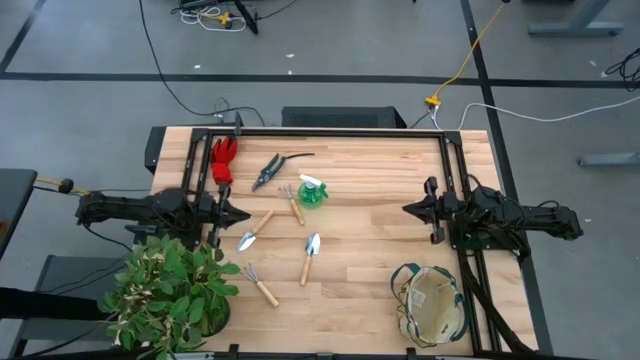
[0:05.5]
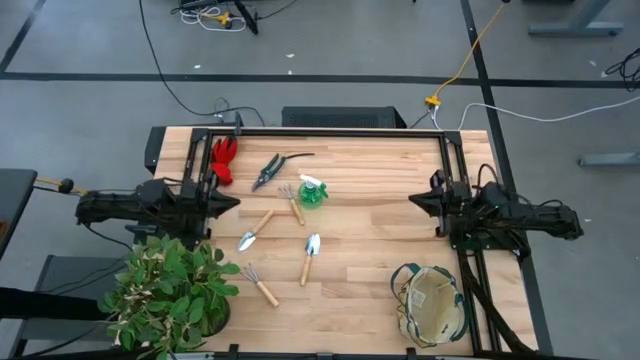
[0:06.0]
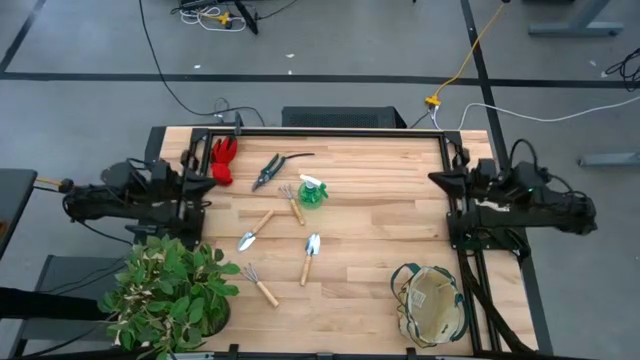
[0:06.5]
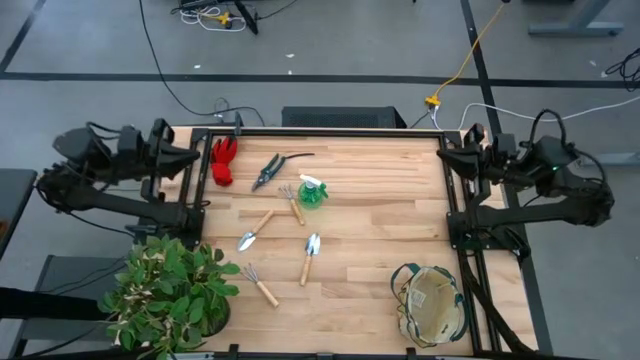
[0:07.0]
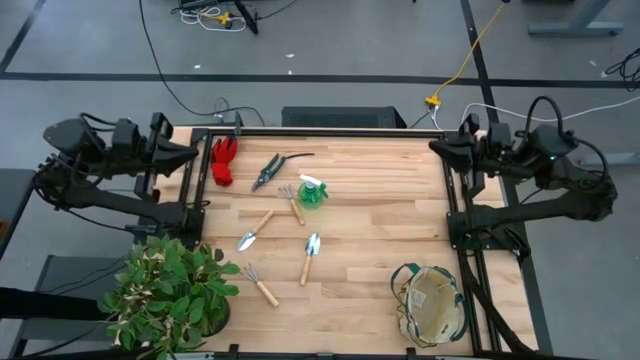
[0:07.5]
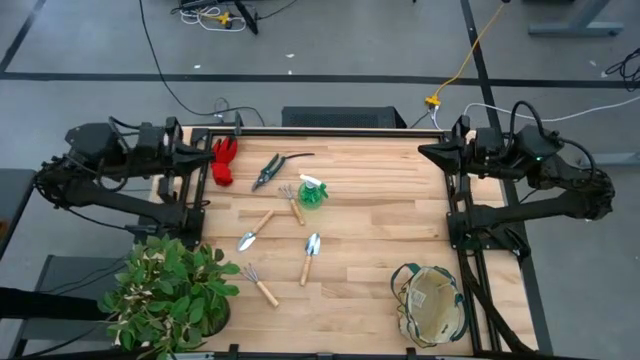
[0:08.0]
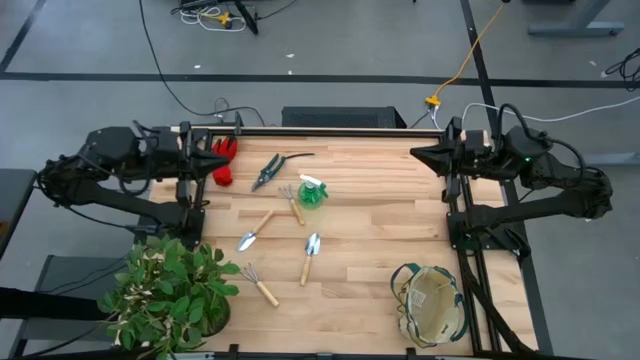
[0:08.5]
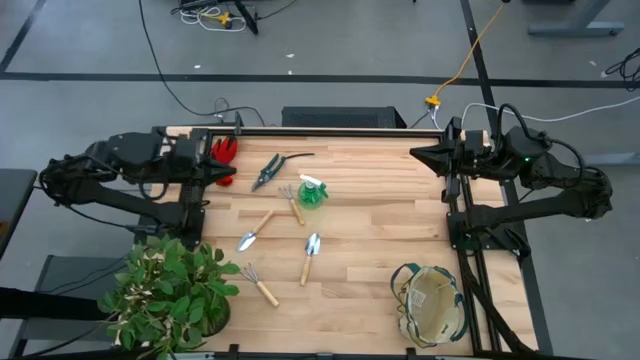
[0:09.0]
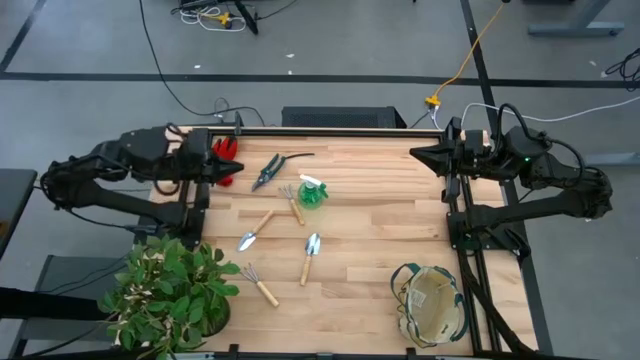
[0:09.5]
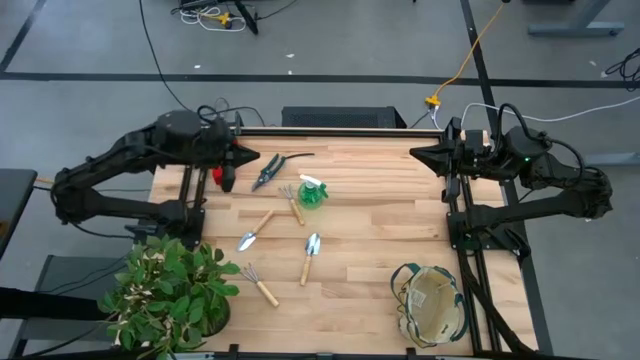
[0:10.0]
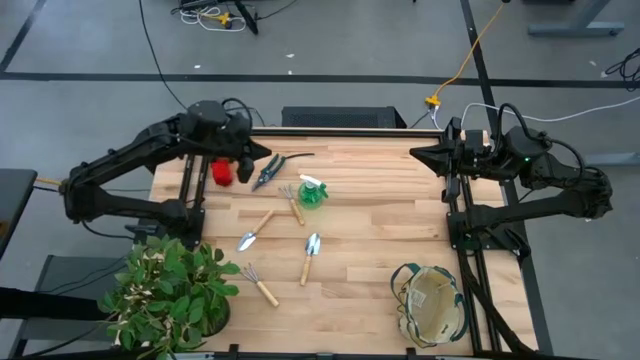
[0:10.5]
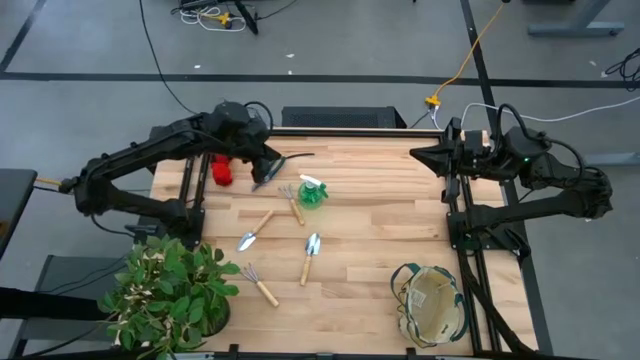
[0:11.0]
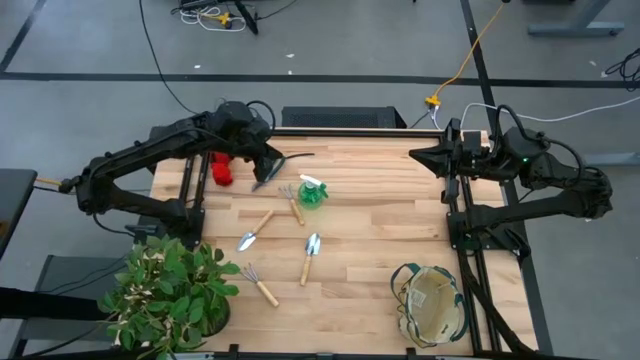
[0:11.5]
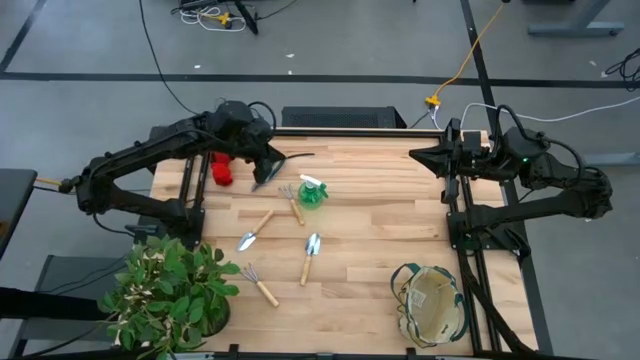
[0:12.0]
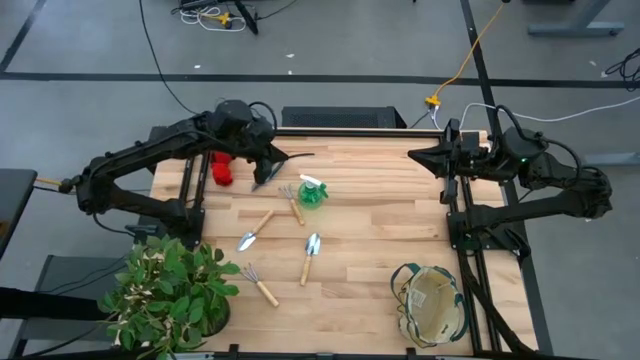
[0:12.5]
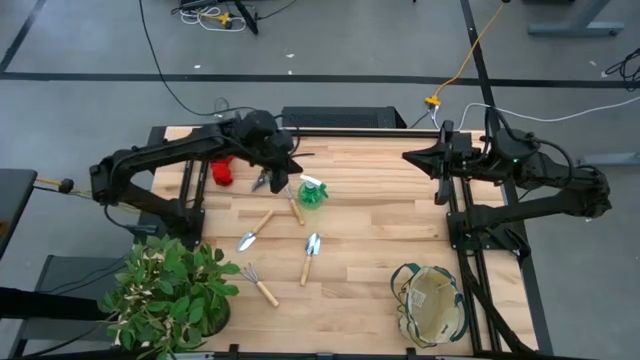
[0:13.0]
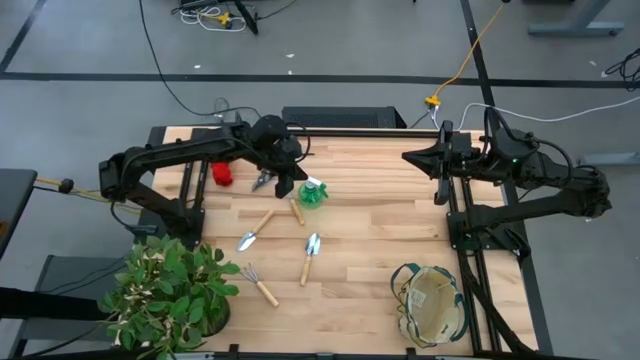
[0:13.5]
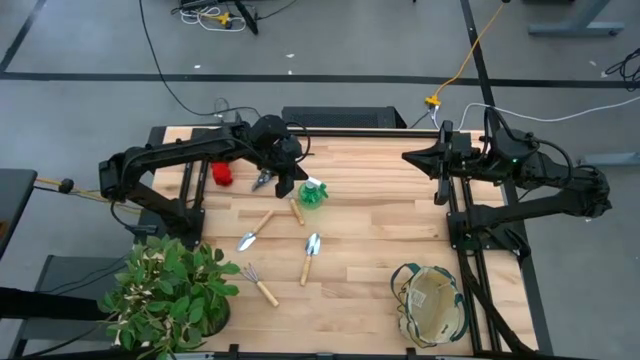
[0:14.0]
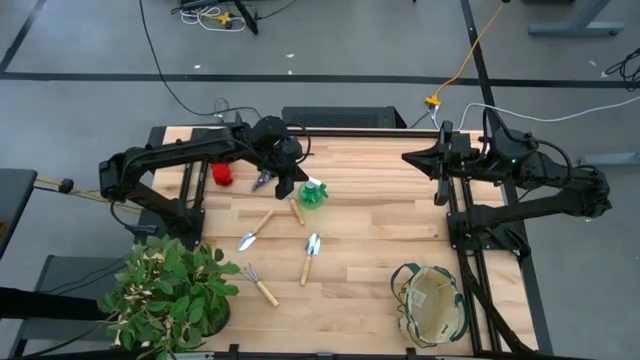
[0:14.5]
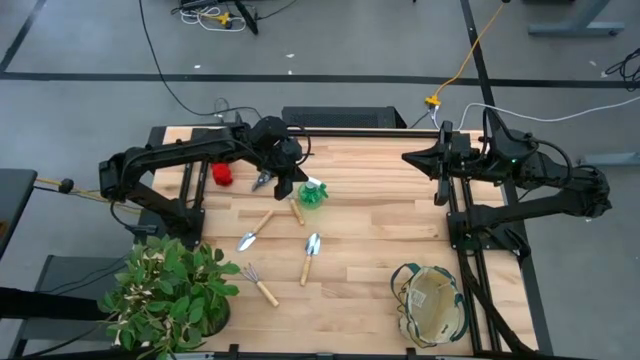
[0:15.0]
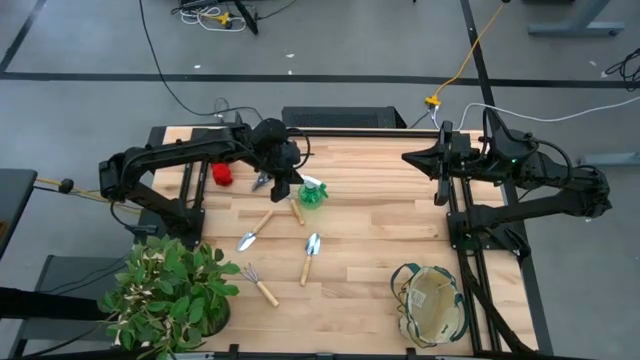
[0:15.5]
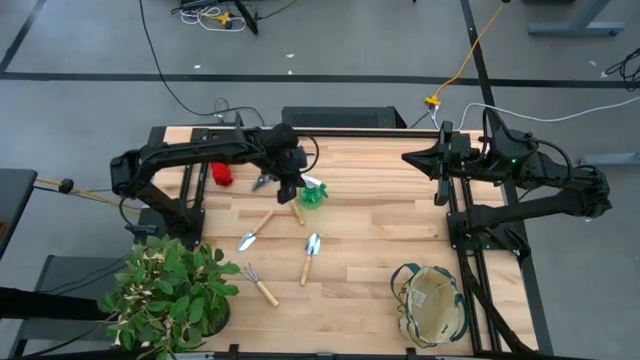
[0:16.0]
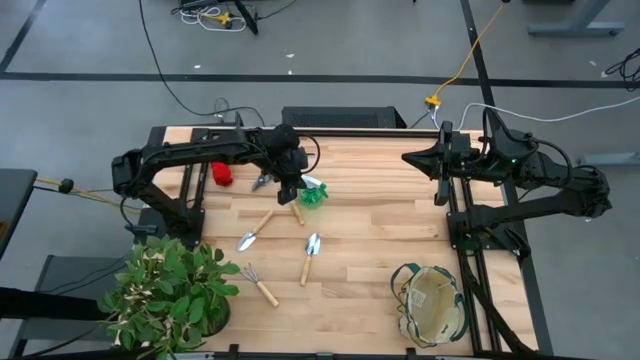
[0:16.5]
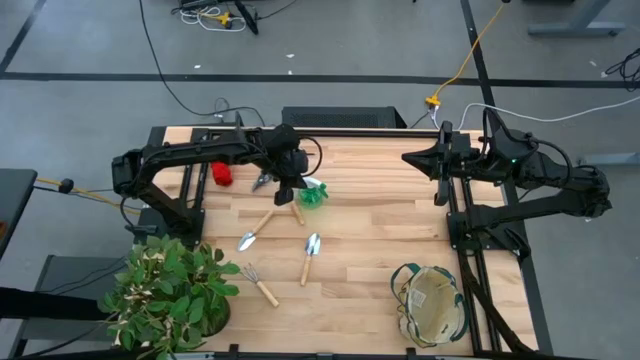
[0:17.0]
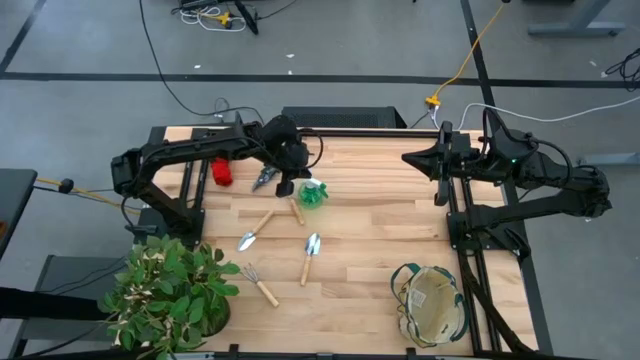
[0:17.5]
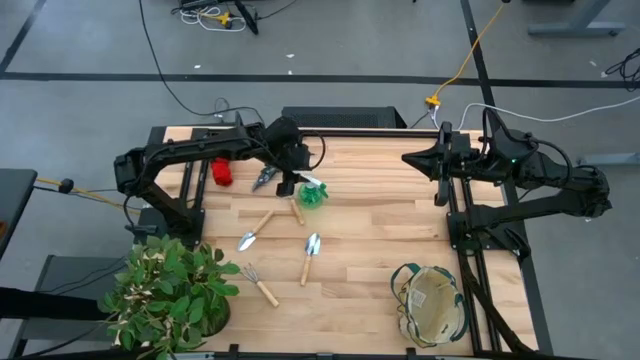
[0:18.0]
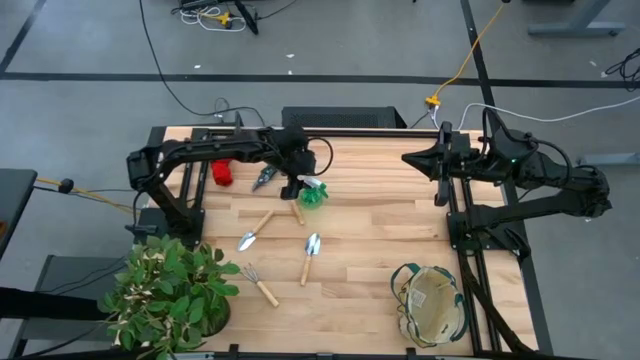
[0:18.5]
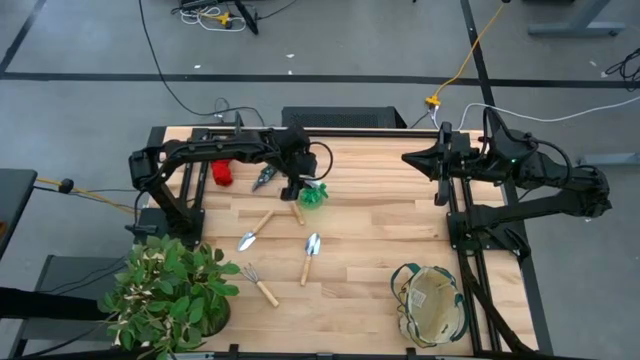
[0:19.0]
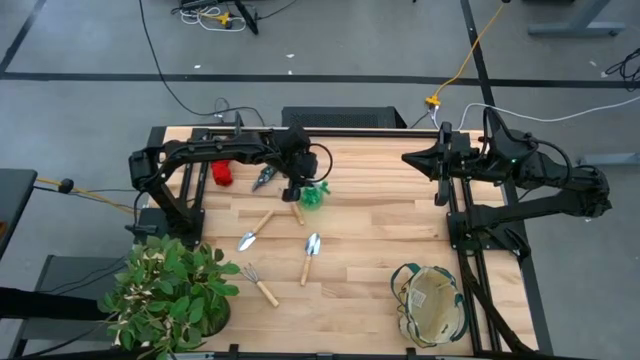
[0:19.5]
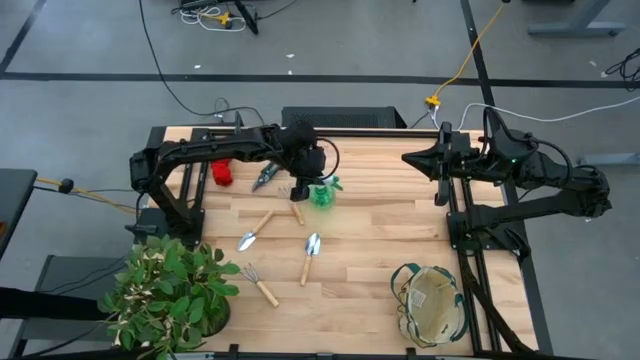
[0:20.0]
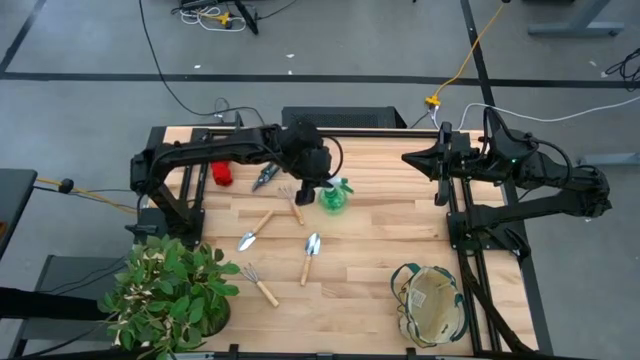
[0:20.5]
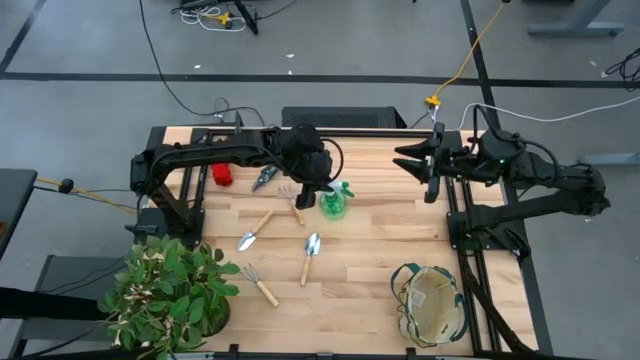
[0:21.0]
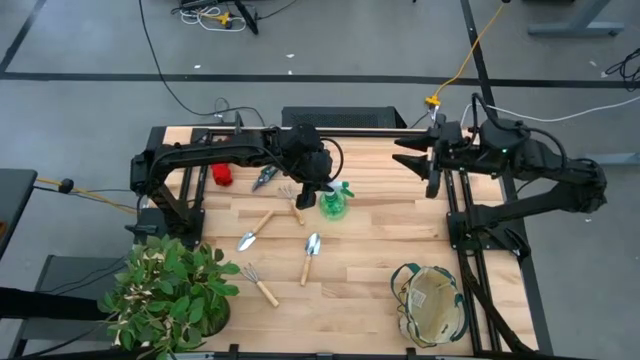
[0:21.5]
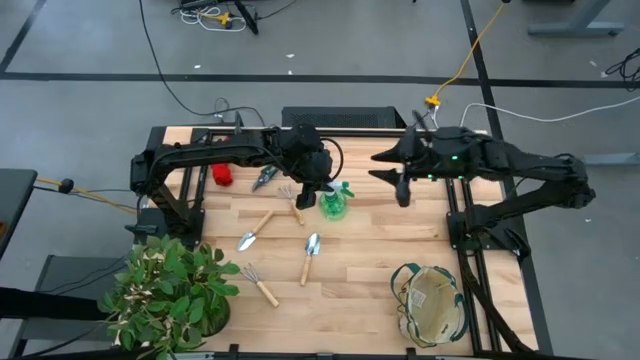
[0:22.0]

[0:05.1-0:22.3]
Task: Pick & Place Garden tools in Gardening bag
Put the green spray bottle into the white gardening bag

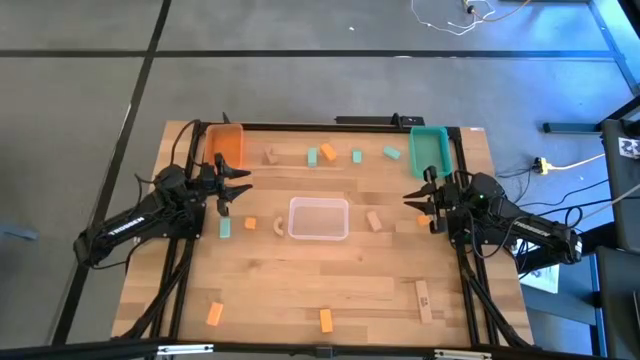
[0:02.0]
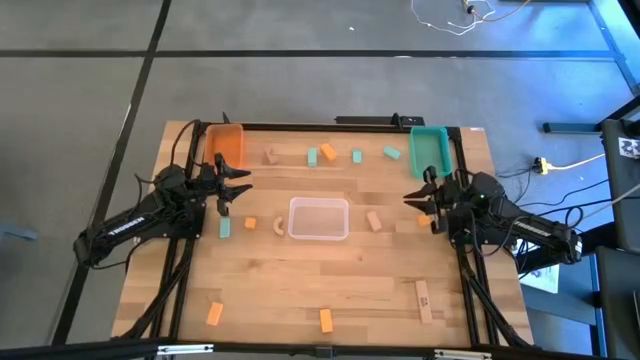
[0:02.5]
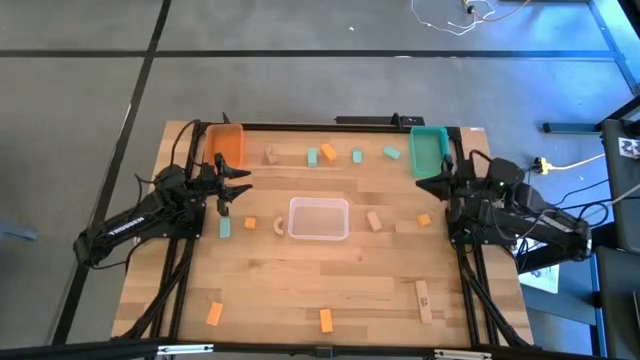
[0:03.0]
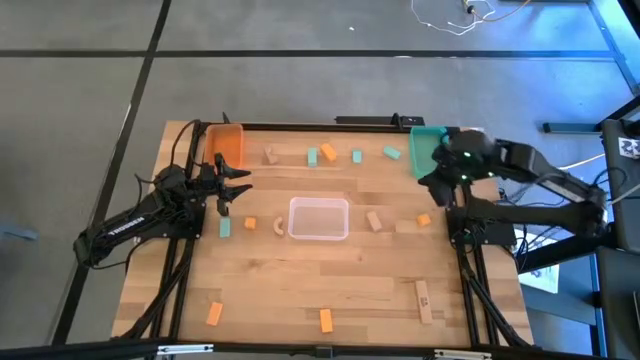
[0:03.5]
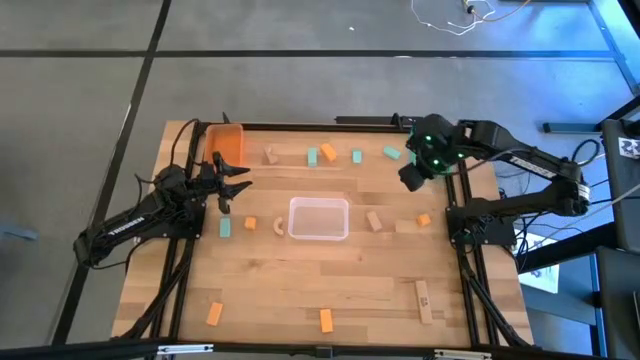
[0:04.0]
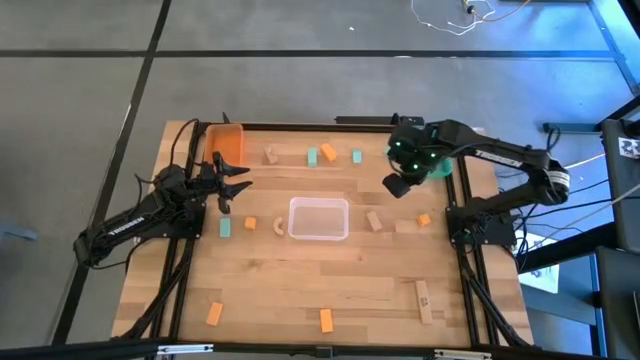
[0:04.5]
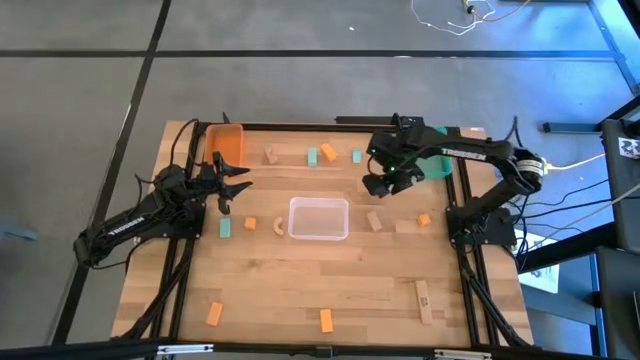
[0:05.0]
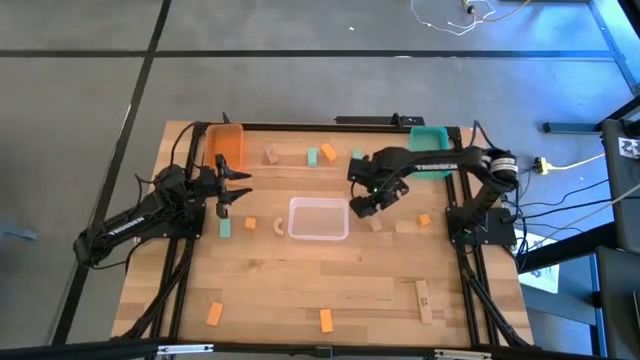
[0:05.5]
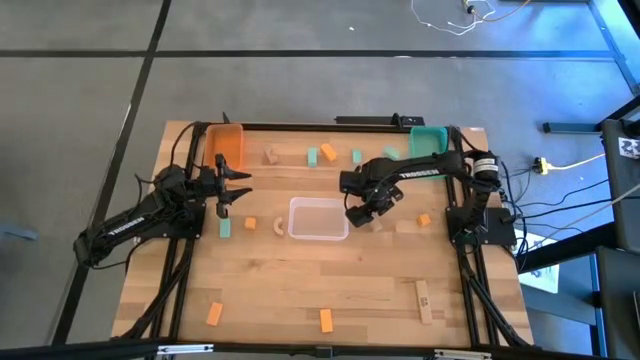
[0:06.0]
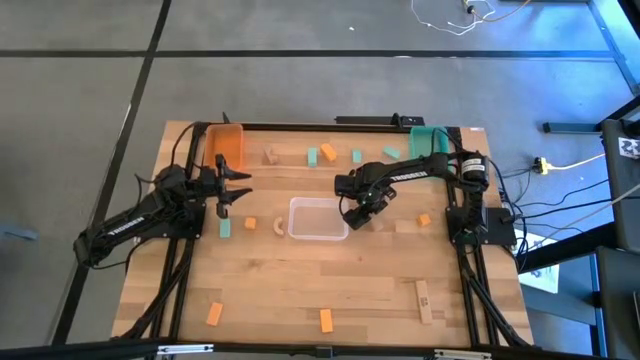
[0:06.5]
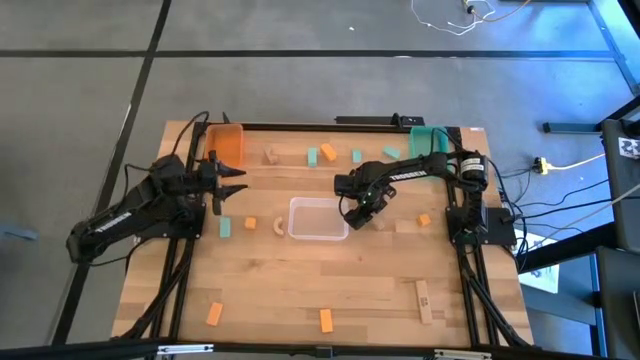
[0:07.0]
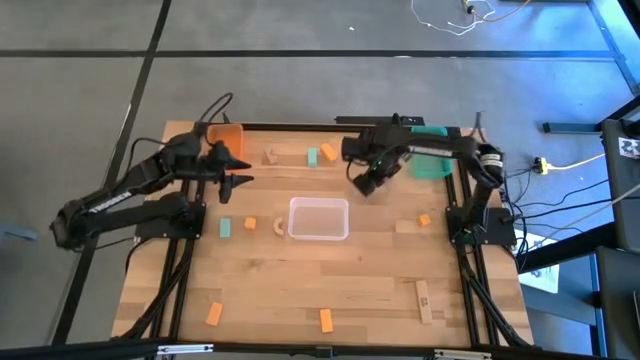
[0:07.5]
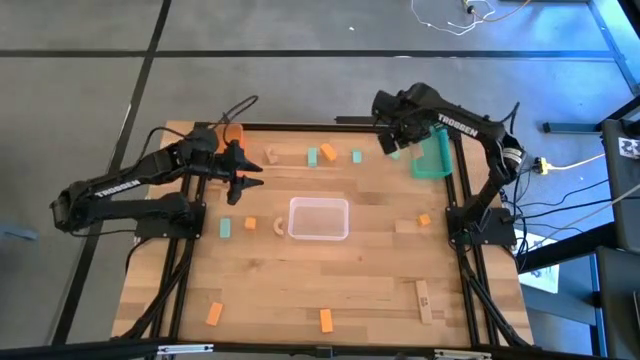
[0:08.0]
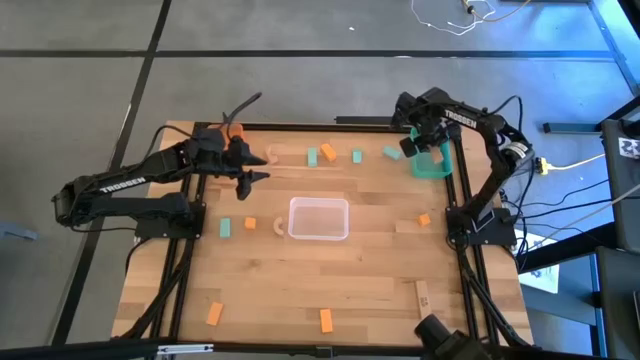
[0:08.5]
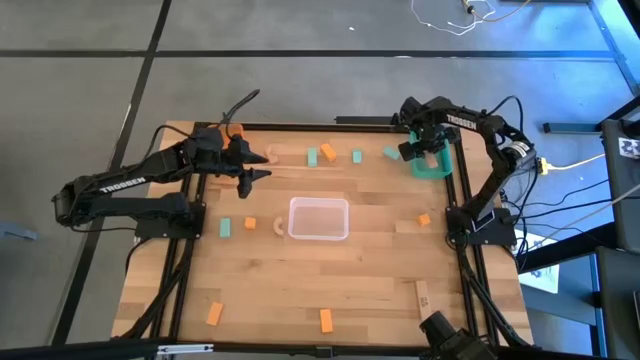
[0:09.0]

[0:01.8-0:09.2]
Task: Sort & place blocks by color
Put the light brown block into the orange bin
